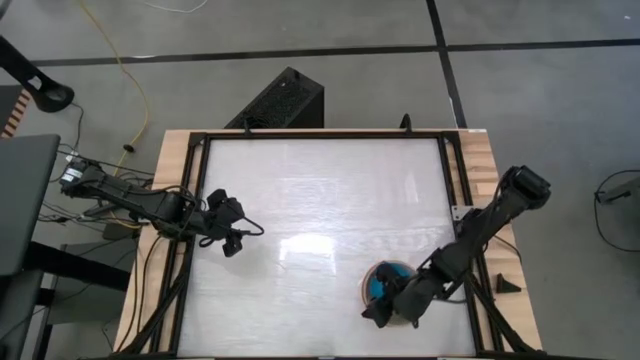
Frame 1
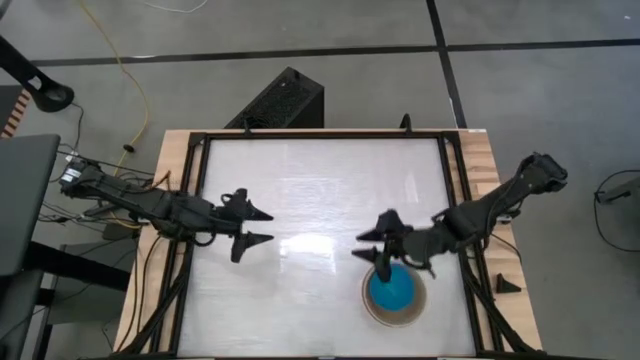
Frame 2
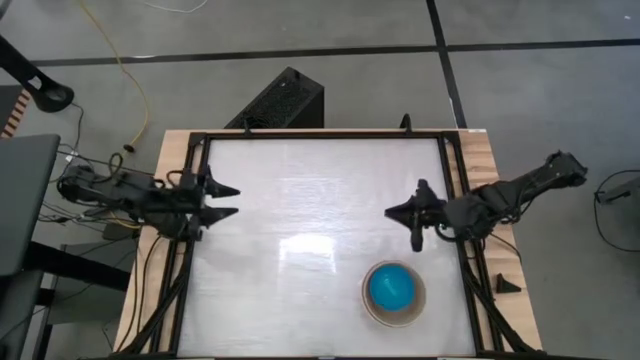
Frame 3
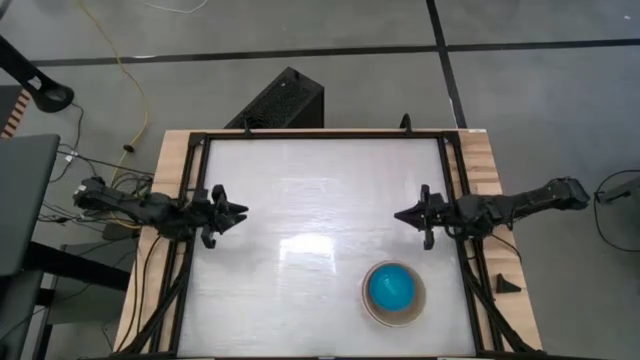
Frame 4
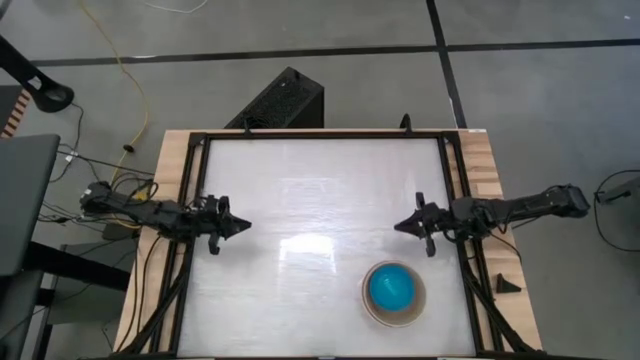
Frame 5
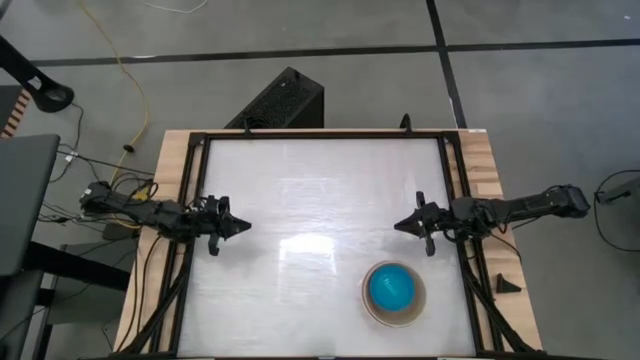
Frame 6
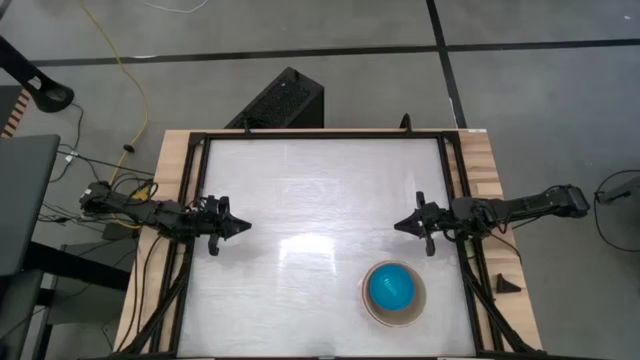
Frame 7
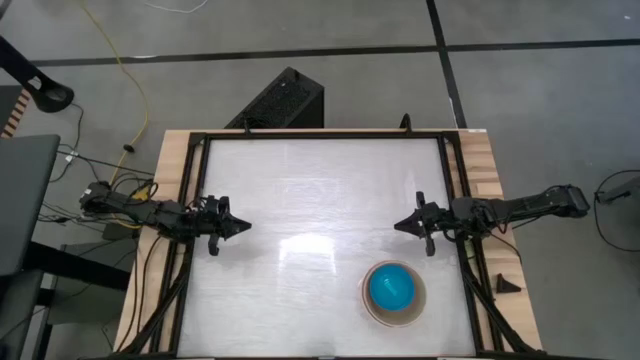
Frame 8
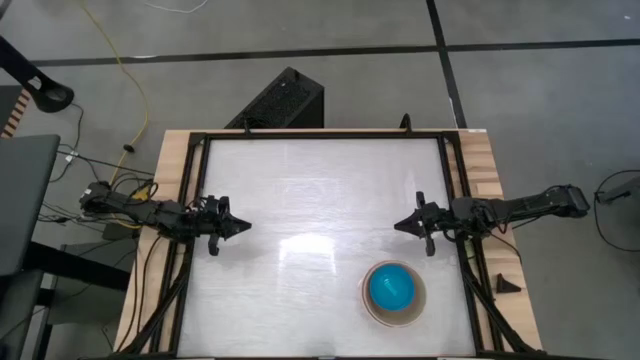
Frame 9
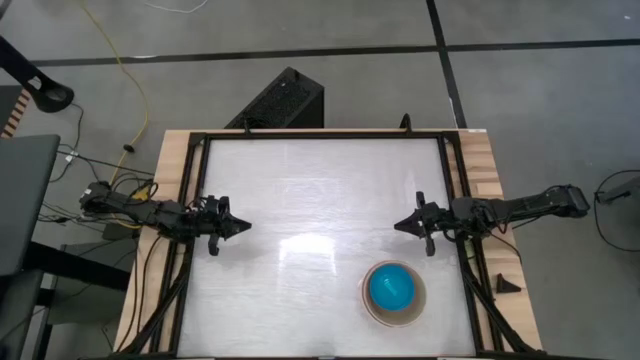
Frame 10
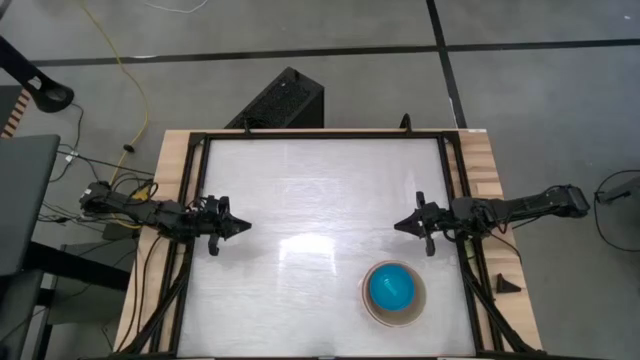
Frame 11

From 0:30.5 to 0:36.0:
Return to Home Position

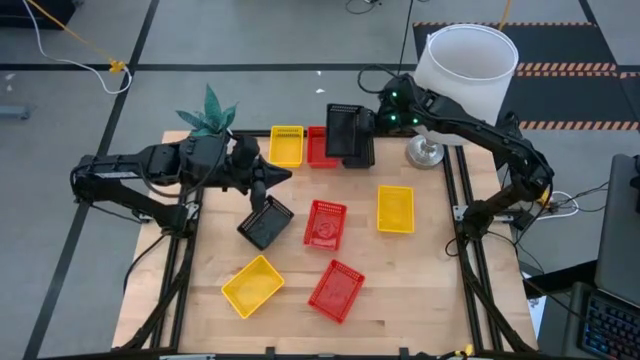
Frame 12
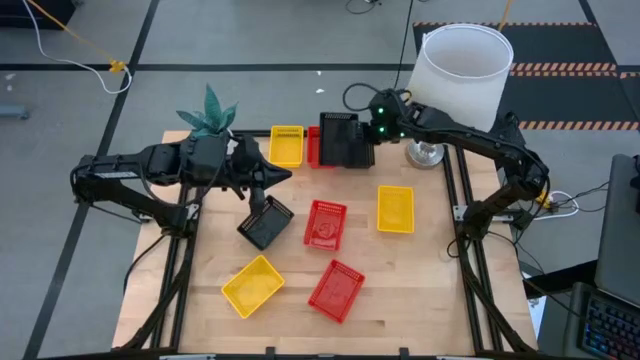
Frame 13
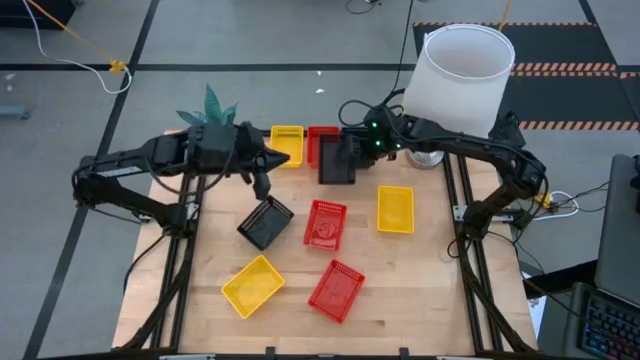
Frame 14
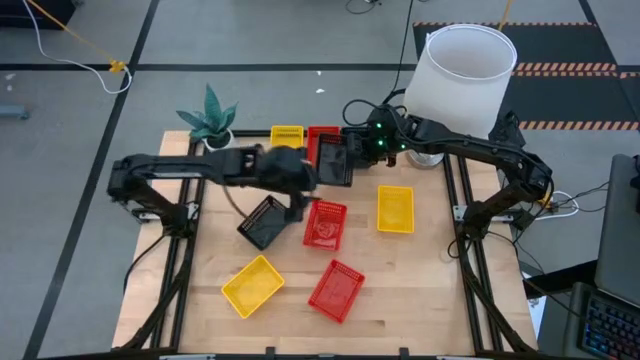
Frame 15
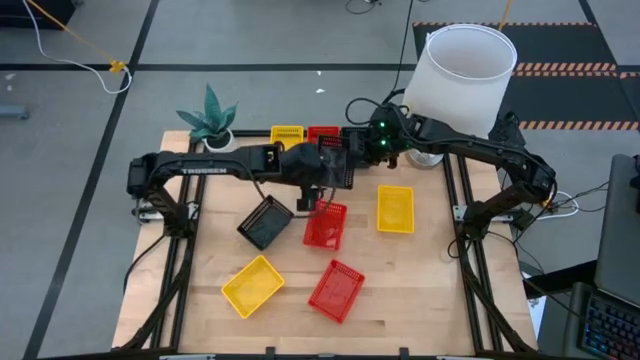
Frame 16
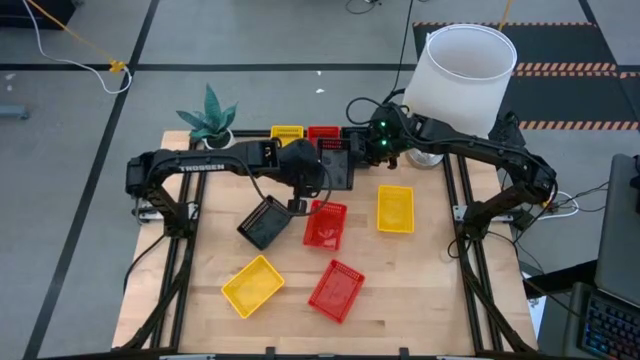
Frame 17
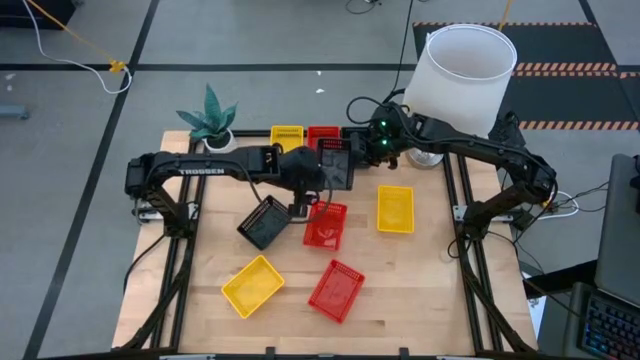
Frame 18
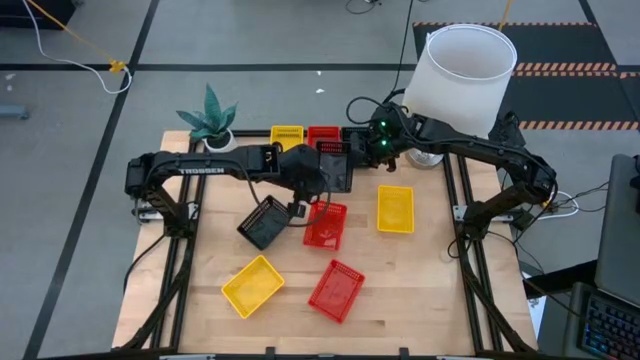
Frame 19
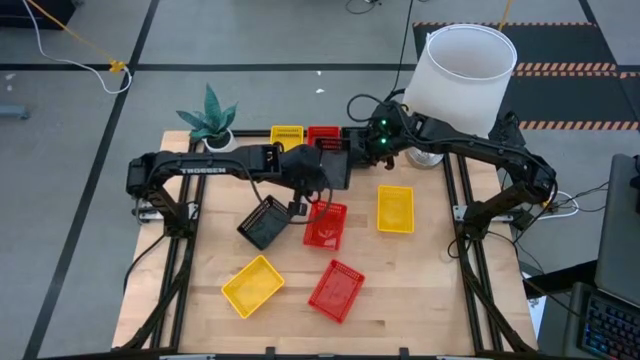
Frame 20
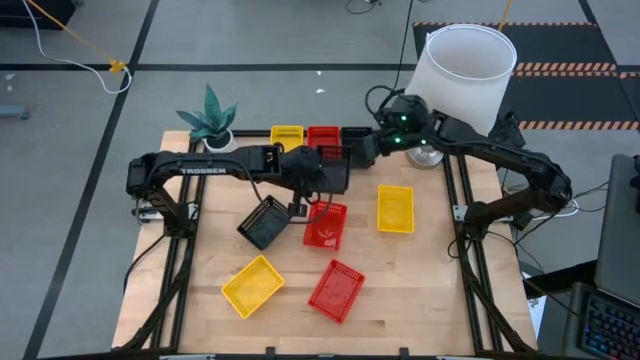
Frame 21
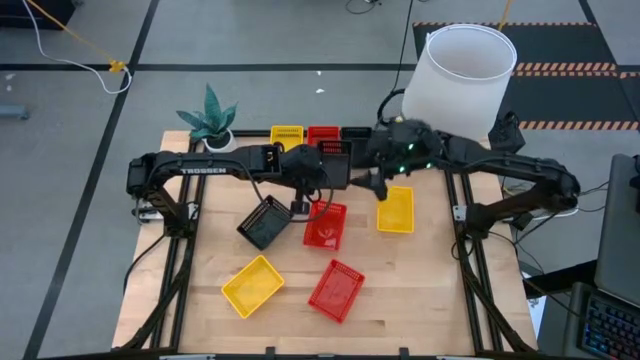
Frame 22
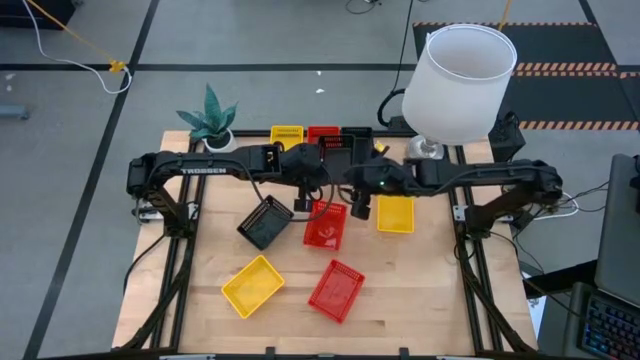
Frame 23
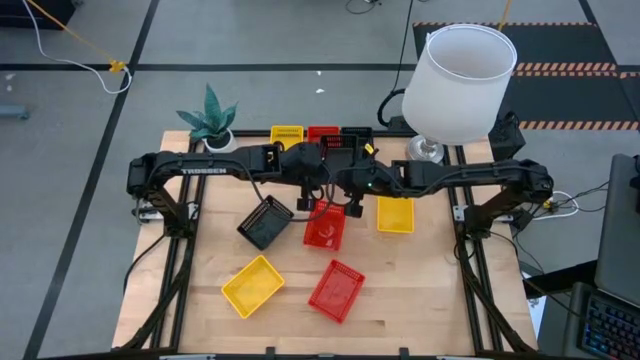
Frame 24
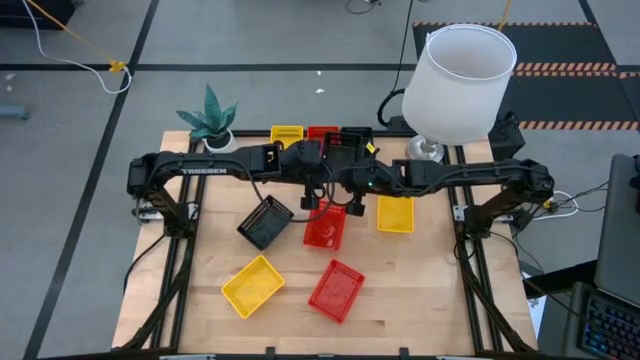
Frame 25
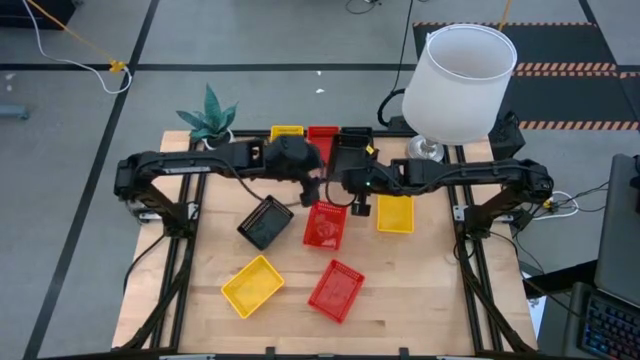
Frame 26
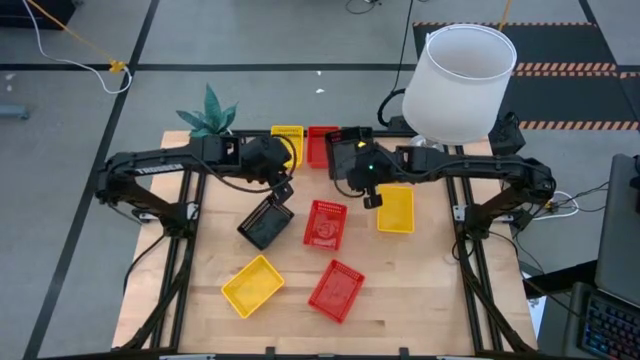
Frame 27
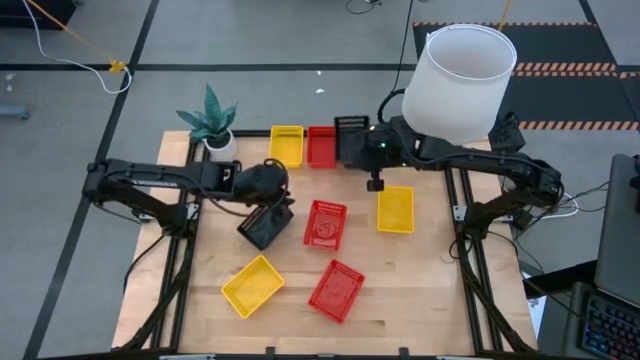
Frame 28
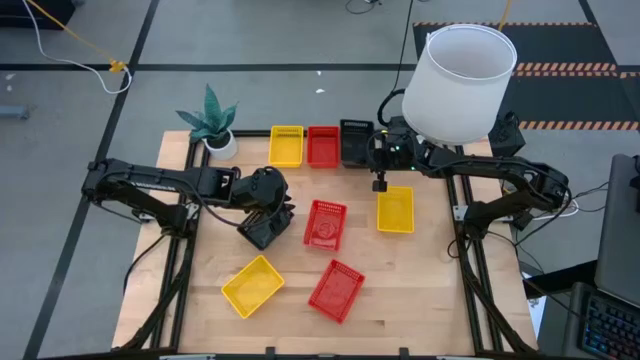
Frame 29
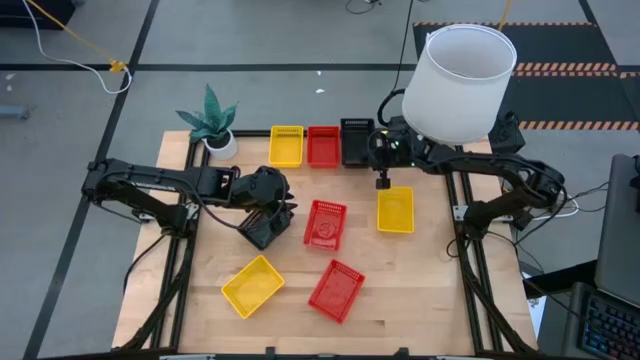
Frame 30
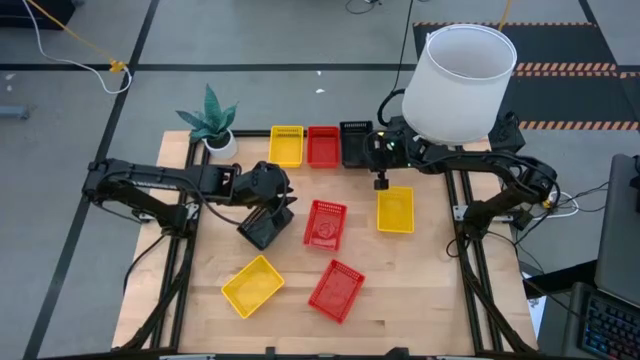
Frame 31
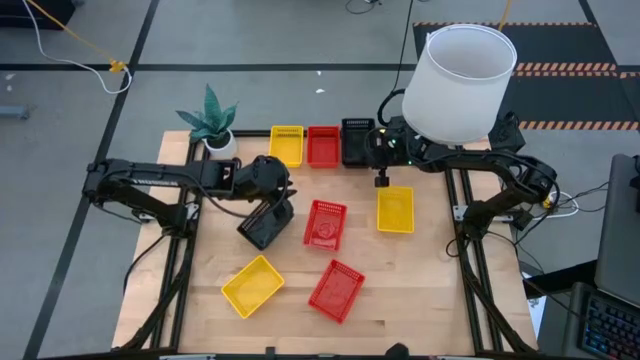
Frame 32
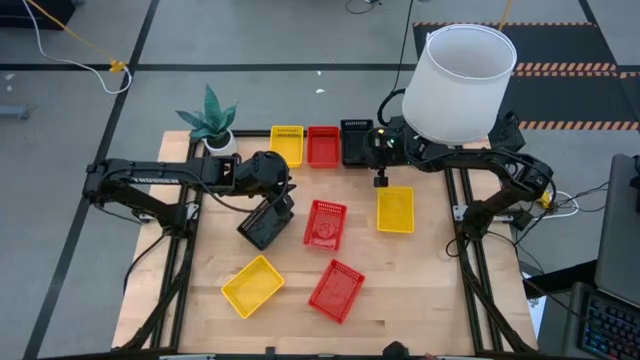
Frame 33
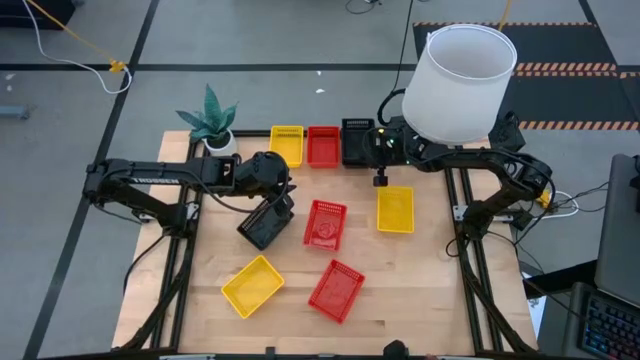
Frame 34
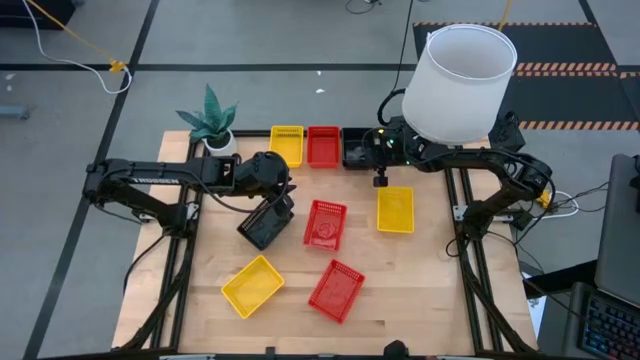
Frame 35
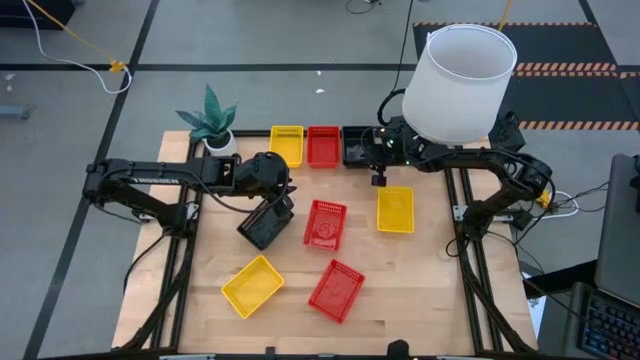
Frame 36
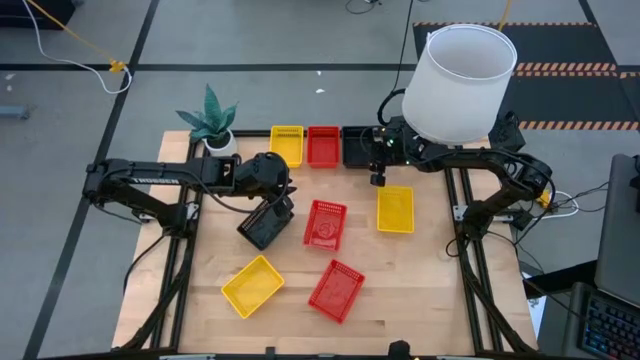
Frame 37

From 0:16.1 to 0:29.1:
Stack the bottom right black basket on the top black basket

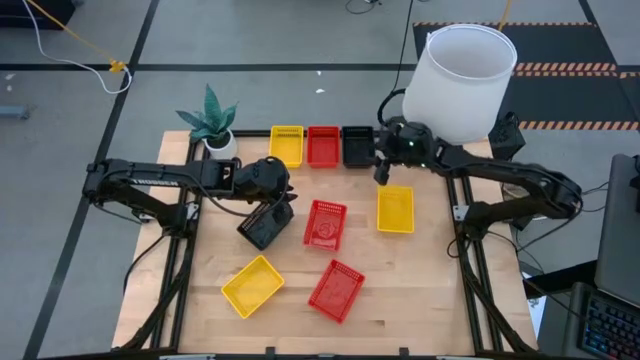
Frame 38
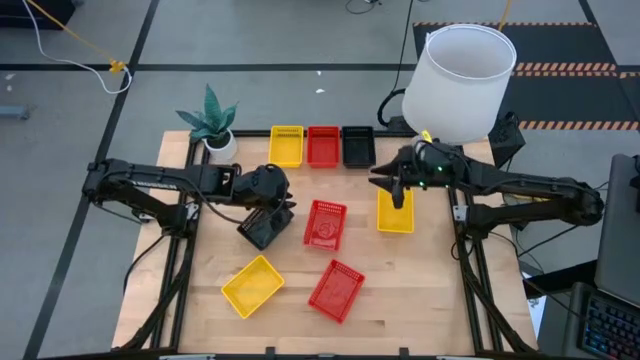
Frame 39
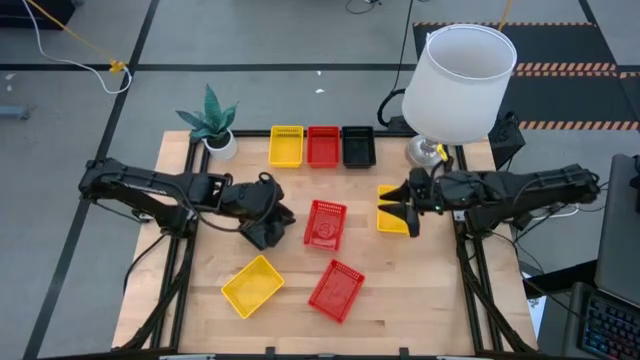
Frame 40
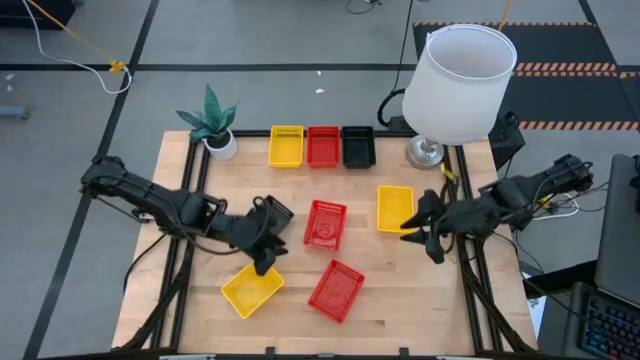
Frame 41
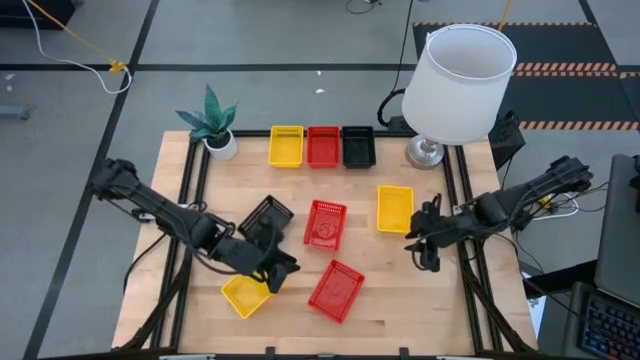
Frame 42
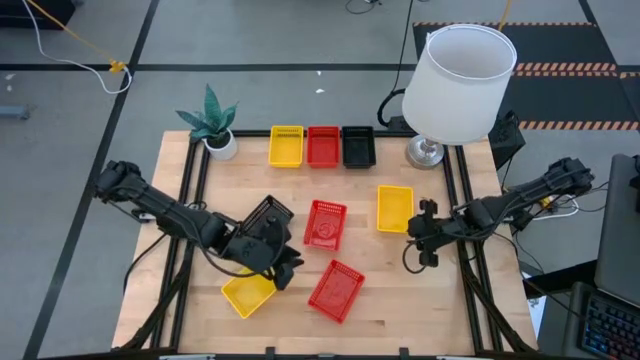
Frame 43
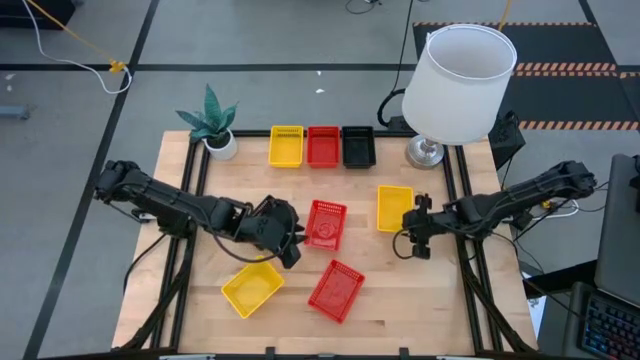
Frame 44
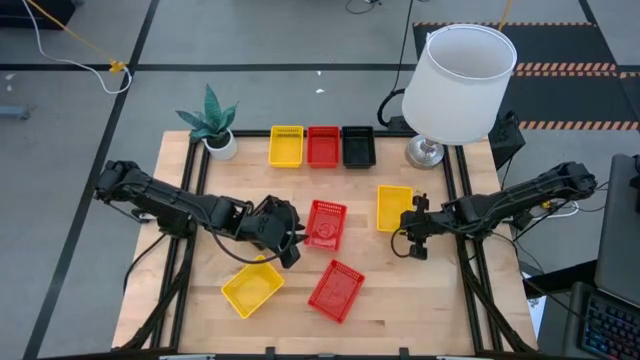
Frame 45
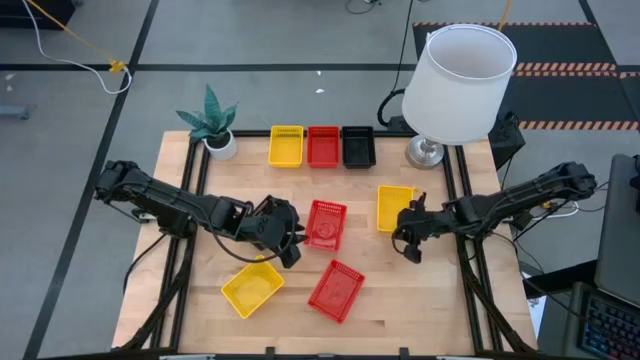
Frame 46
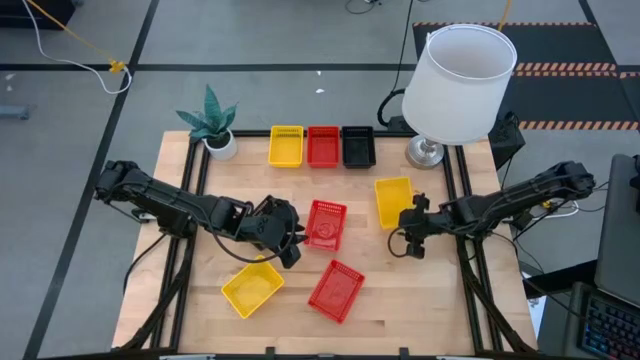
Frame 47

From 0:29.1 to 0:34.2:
Stack the right yellow basket on the top yellow basket
